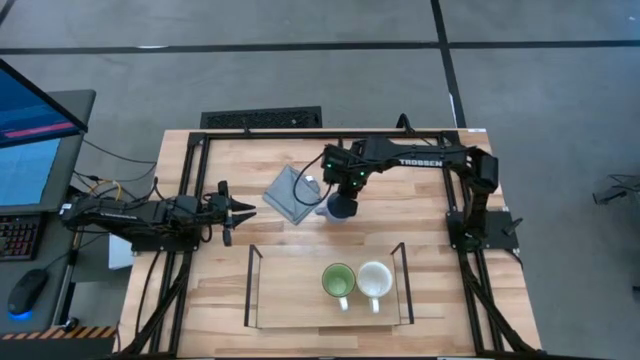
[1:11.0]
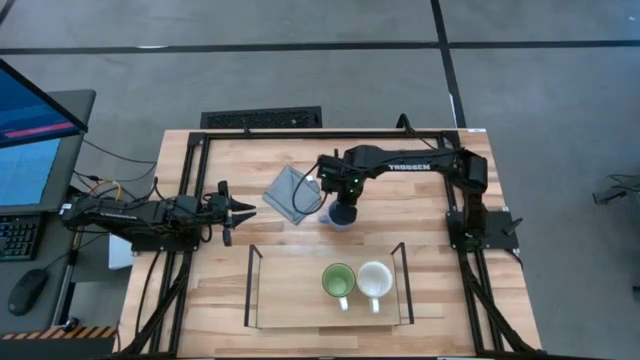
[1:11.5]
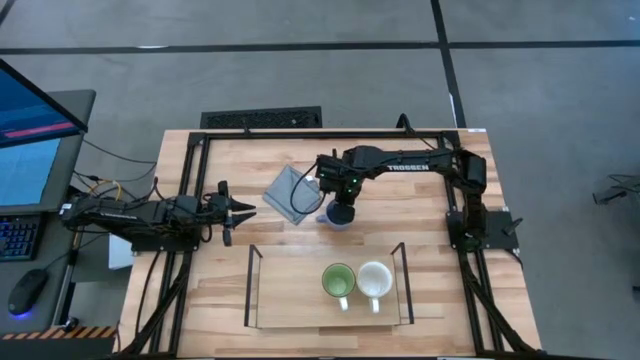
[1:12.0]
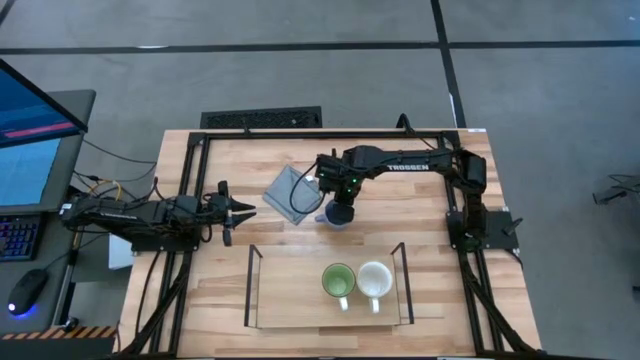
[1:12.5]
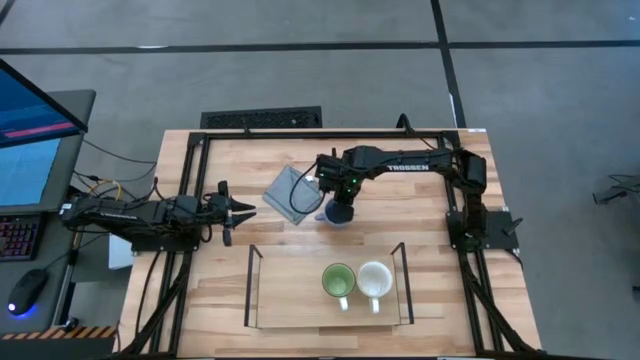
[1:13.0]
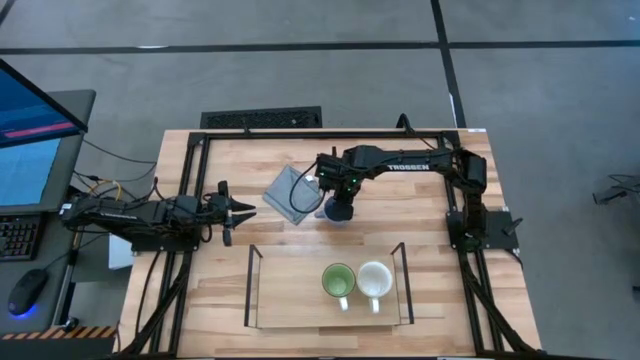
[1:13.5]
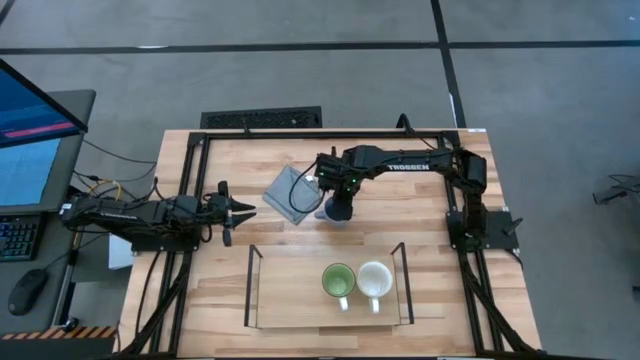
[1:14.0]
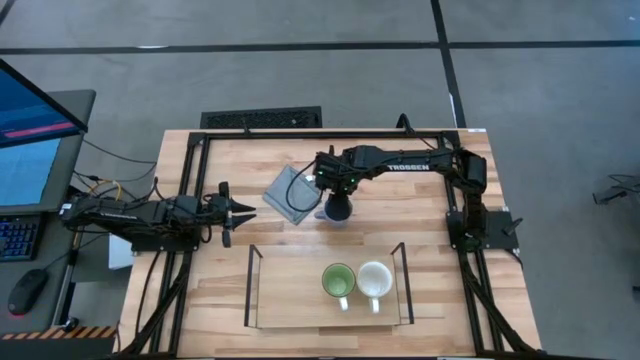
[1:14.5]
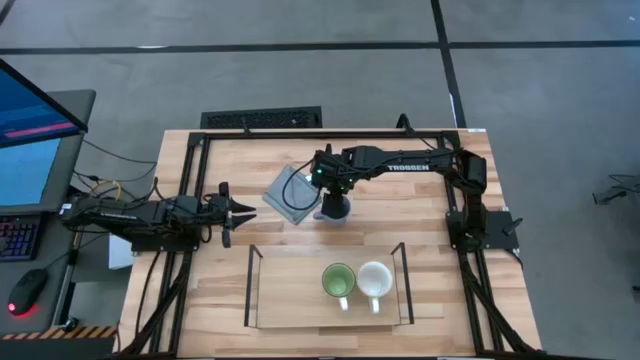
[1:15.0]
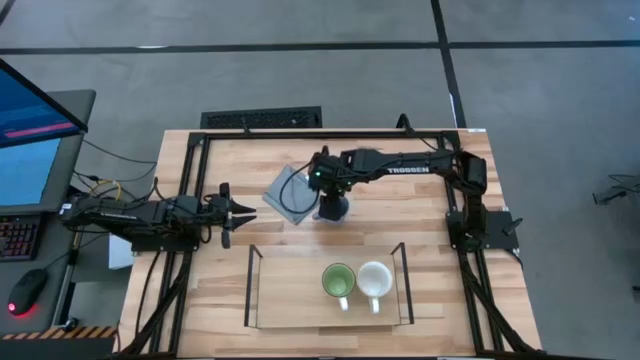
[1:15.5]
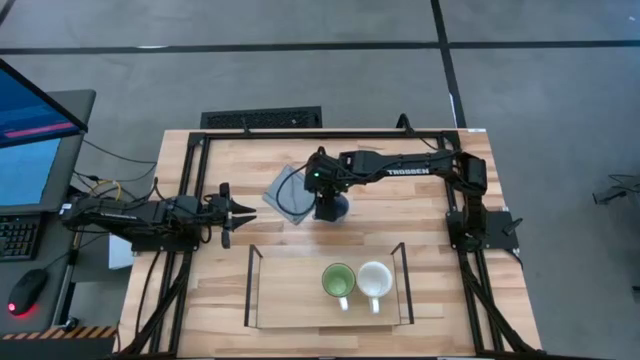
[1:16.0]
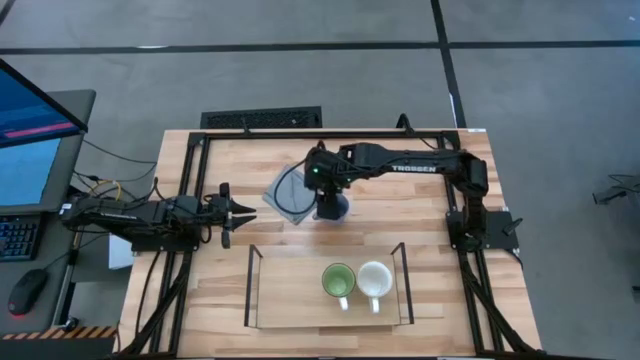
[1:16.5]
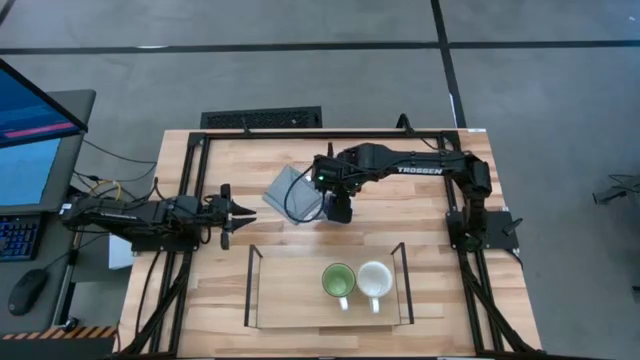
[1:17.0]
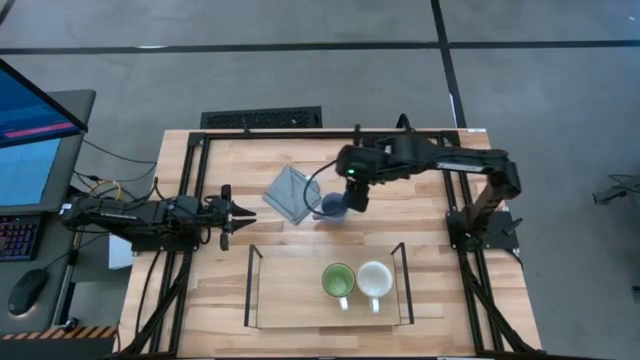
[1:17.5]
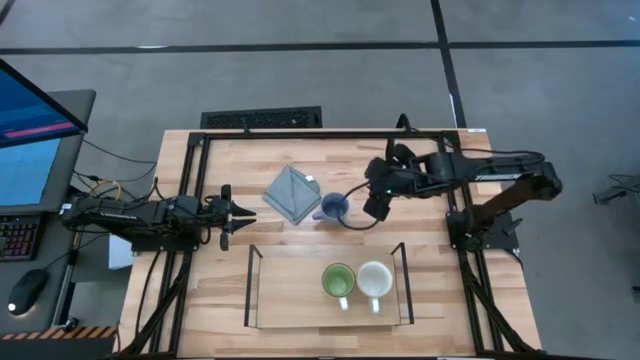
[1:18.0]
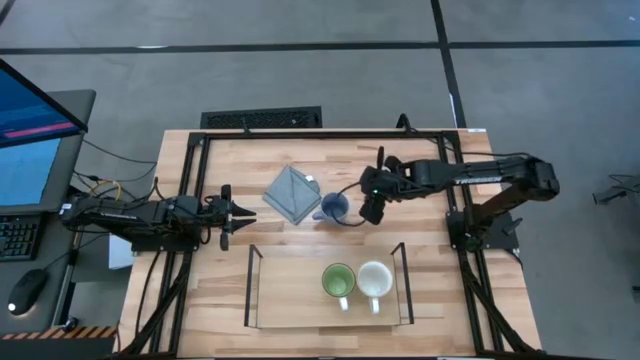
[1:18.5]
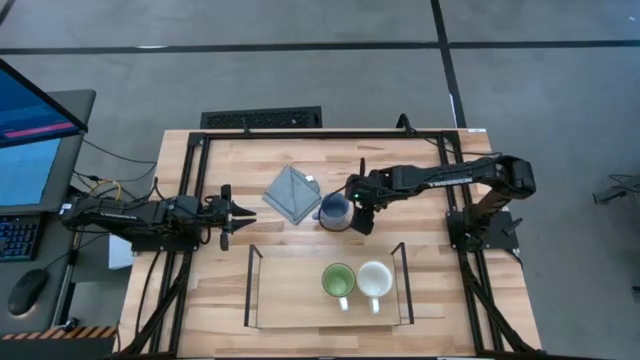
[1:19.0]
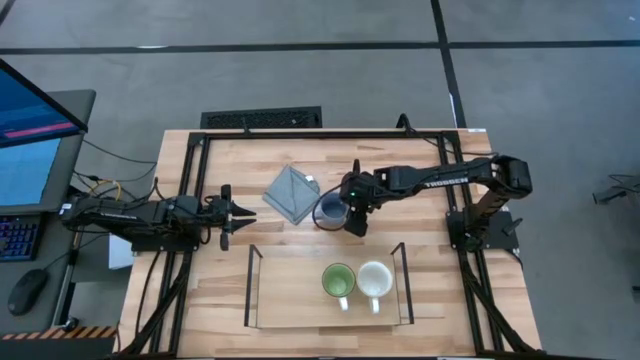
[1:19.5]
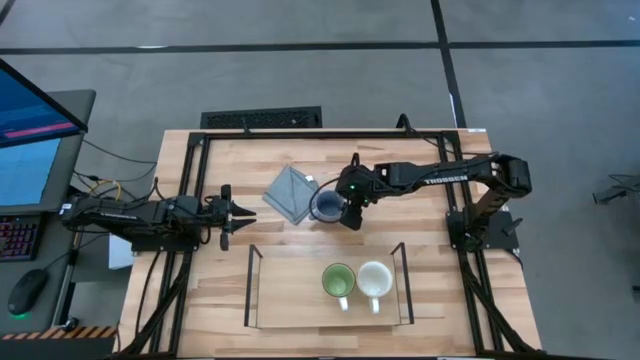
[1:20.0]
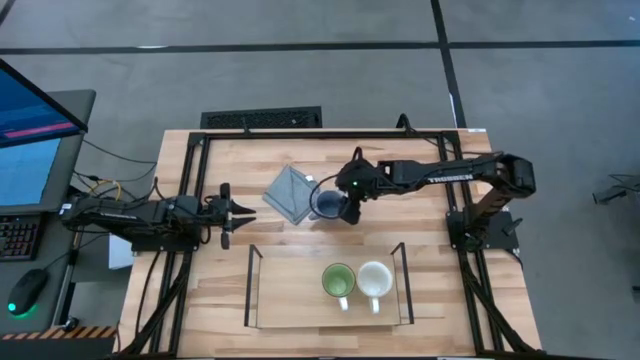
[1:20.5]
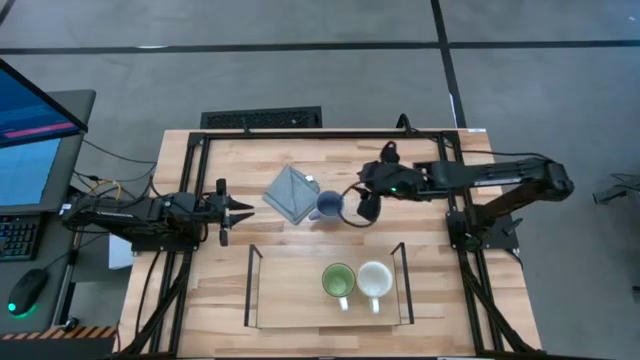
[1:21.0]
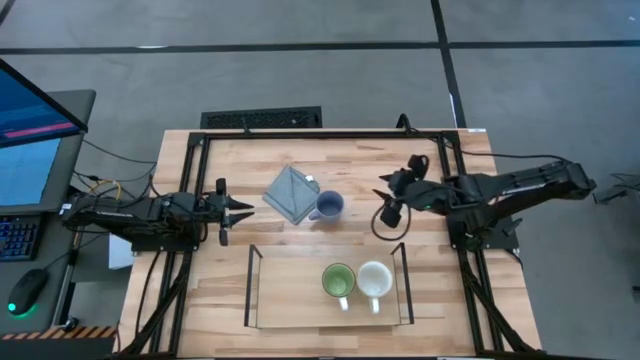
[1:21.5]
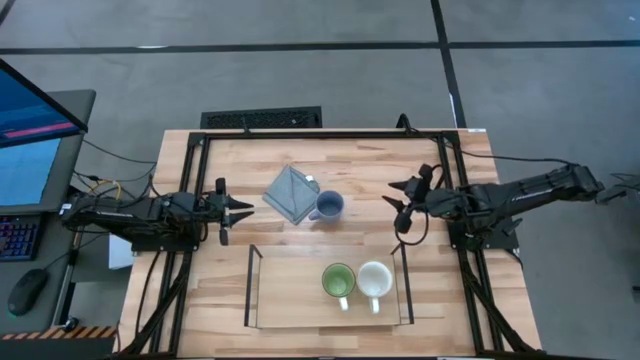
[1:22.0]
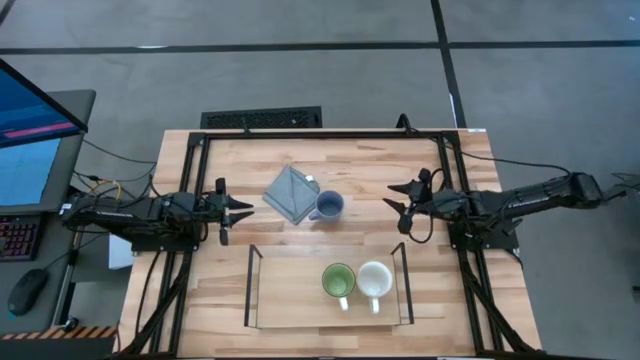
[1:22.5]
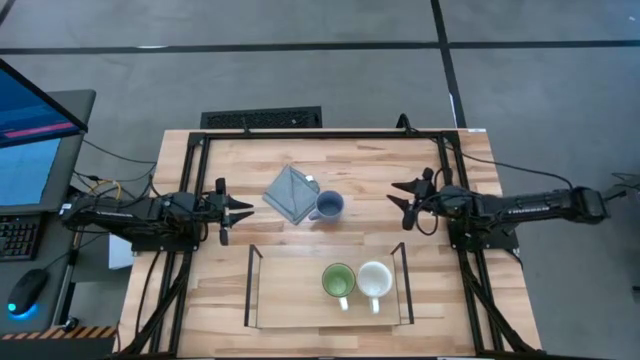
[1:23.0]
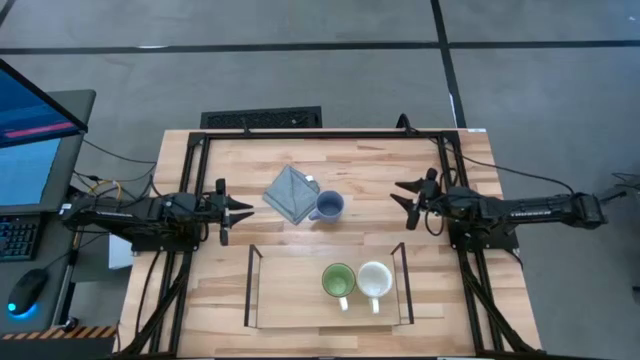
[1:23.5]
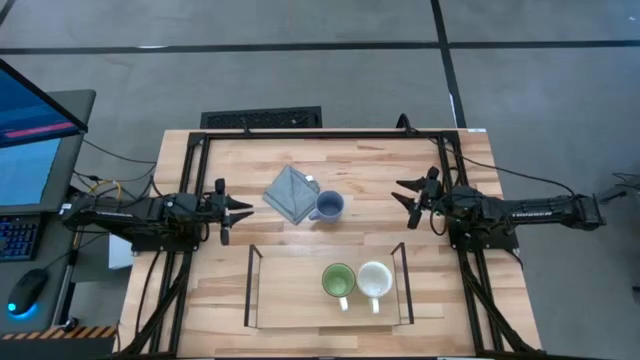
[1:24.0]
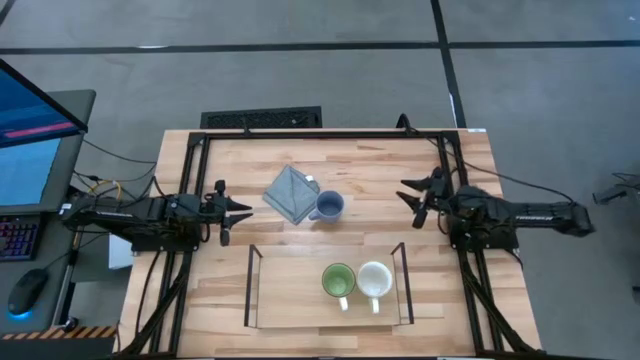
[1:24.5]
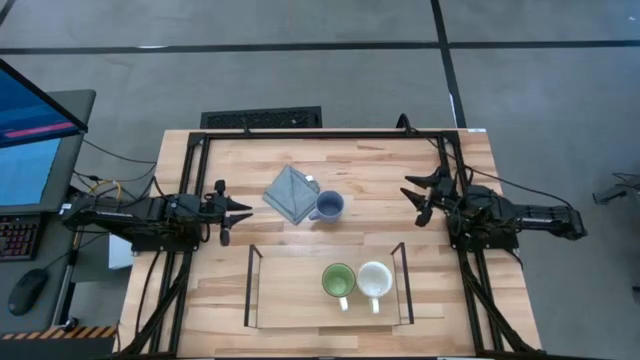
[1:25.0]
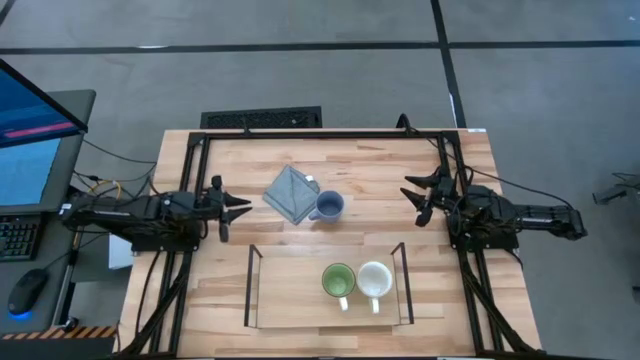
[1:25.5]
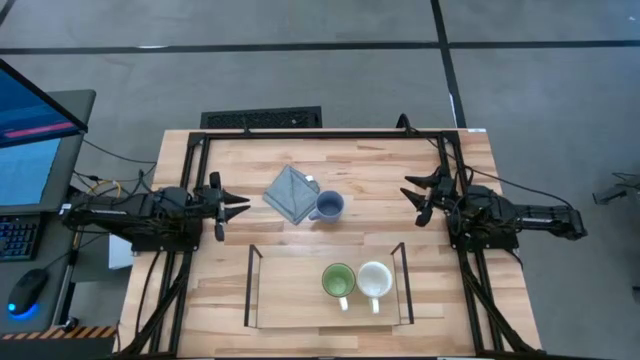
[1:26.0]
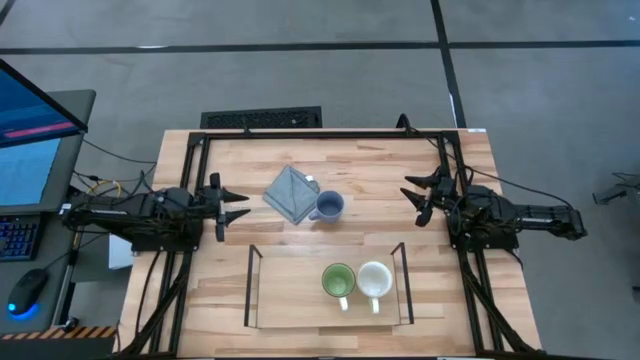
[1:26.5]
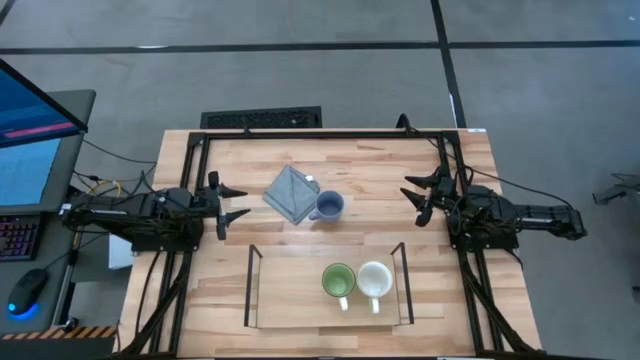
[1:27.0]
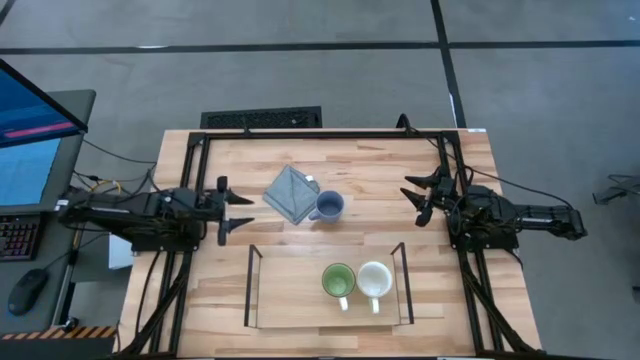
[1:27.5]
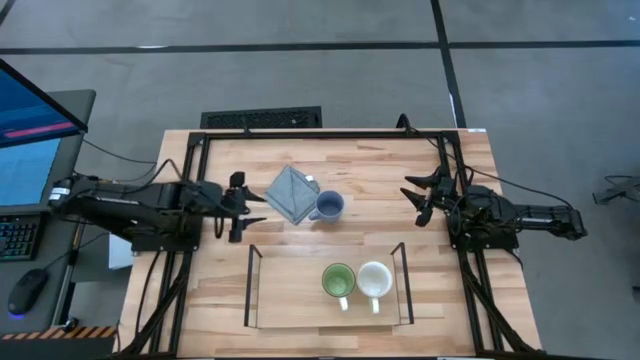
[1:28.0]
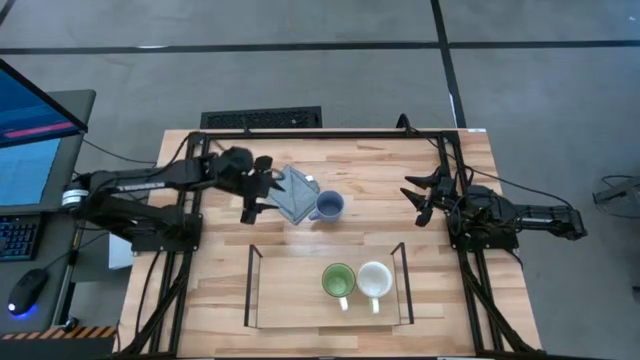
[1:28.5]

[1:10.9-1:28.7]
Task: Stack small to large cups/mugs on shelf
Put the blue mug on the shelf

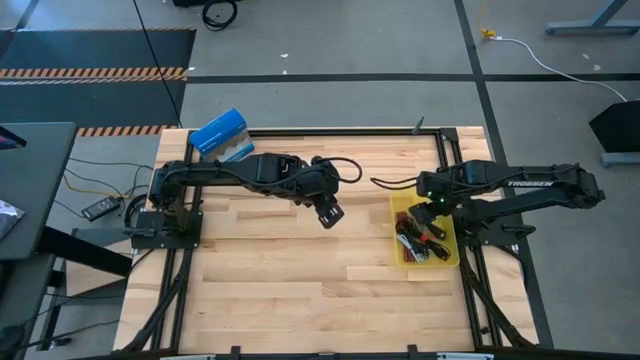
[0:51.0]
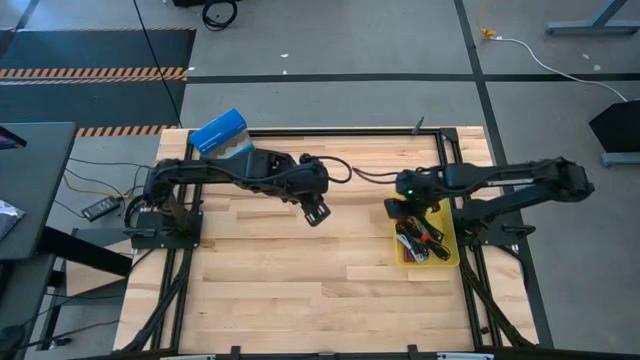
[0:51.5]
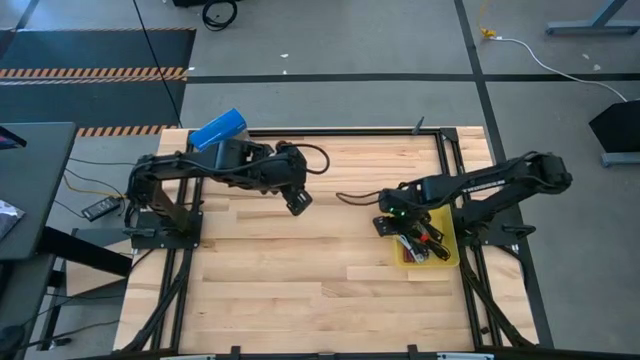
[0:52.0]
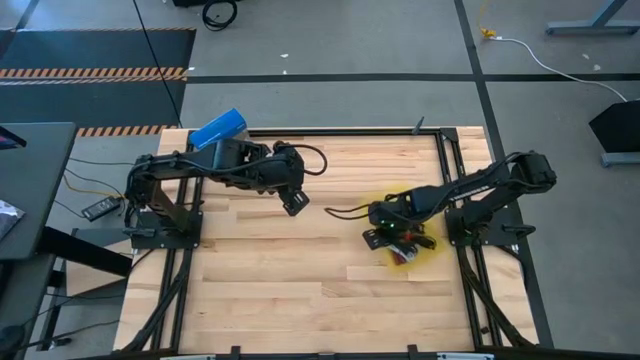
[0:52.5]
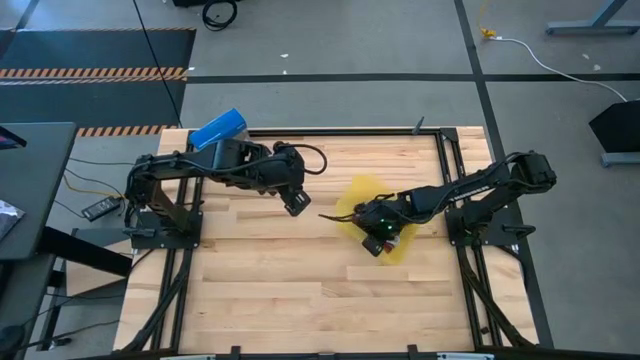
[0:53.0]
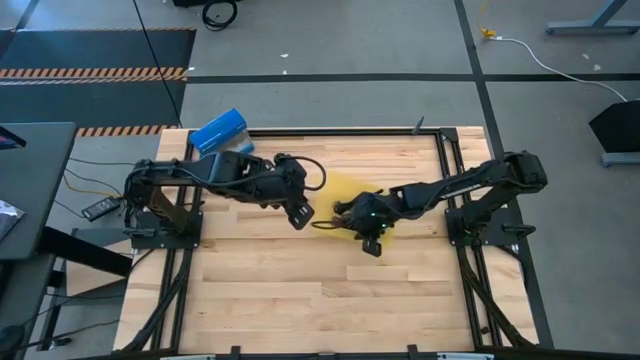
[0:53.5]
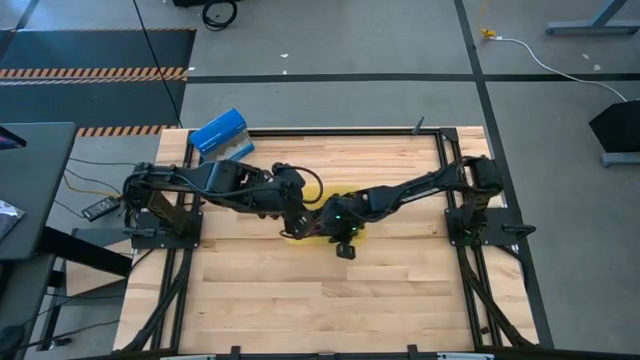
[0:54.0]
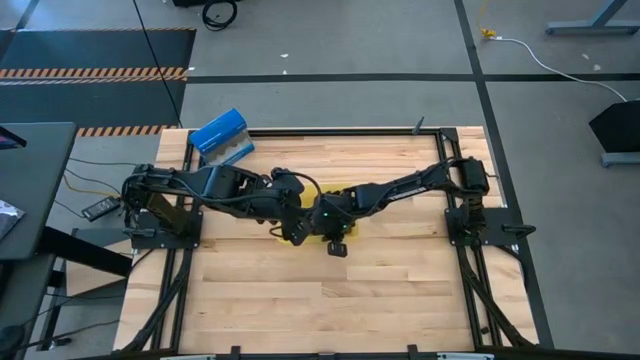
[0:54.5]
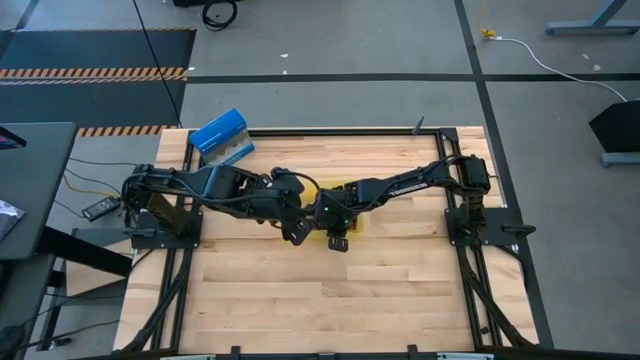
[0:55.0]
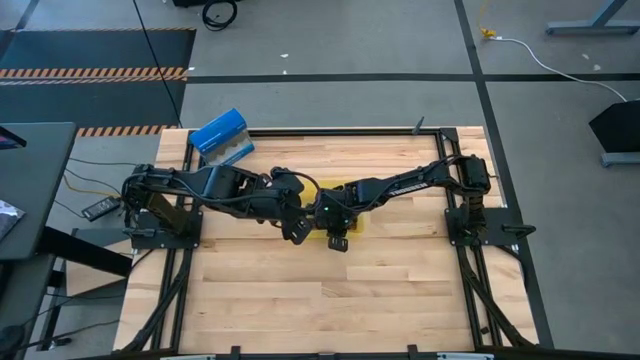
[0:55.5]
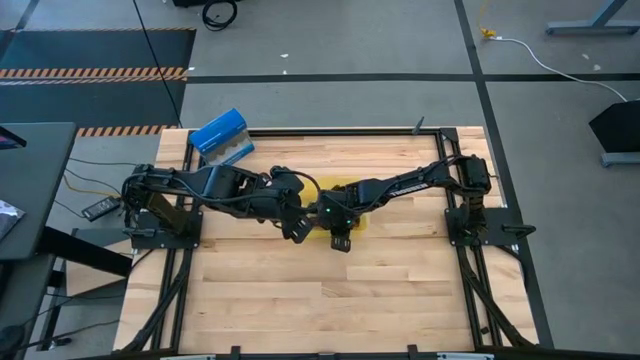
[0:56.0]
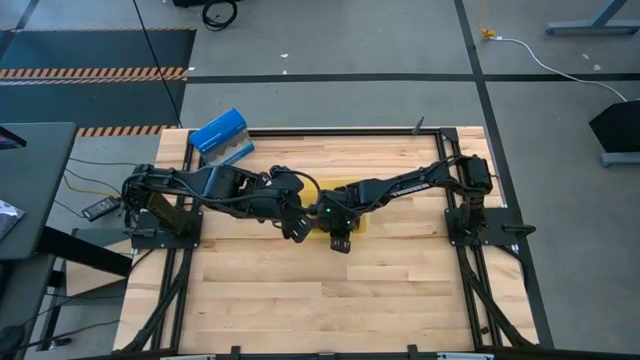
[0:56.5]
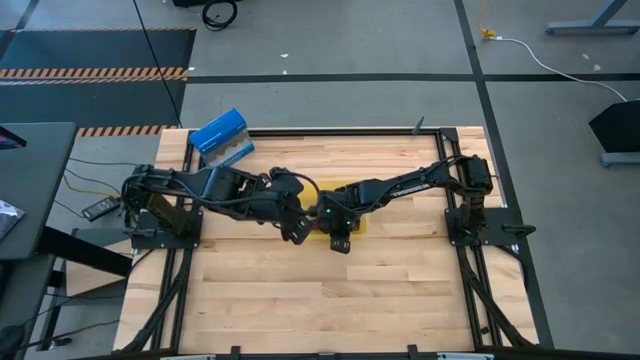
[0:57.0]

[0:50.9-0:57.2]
Task: Pick and place USB-C Cables
Move the yellow bin to the center of the table
